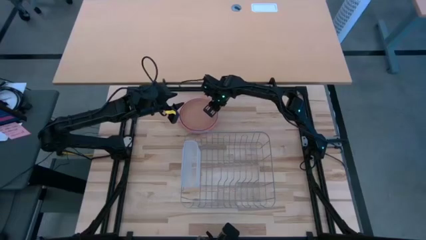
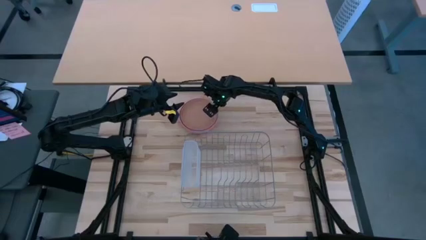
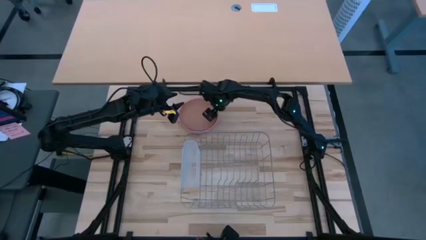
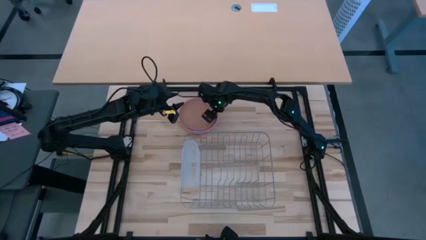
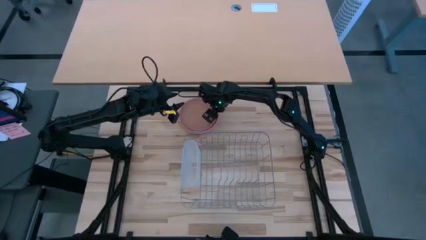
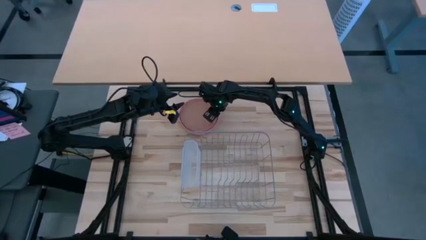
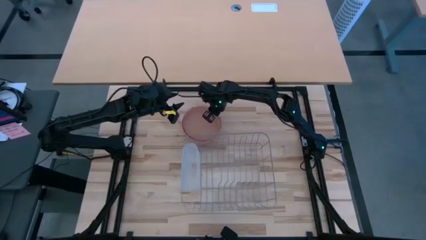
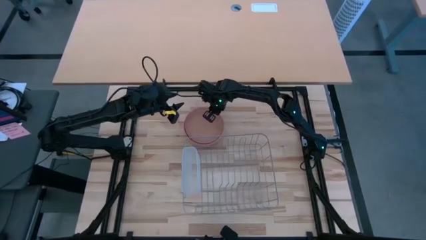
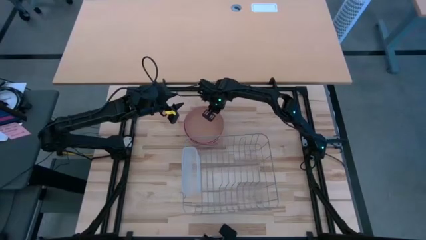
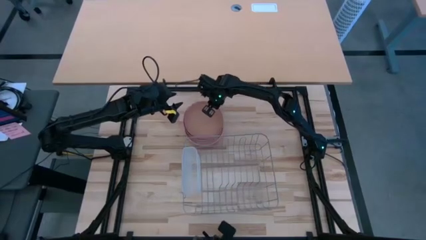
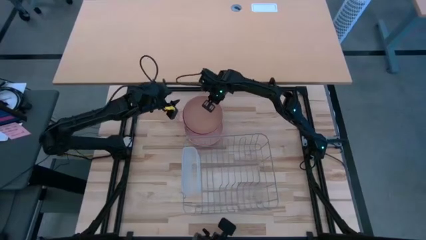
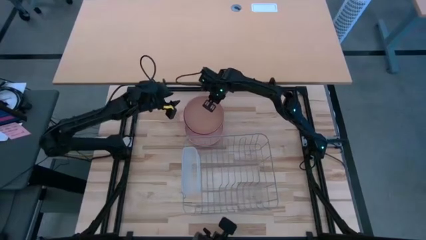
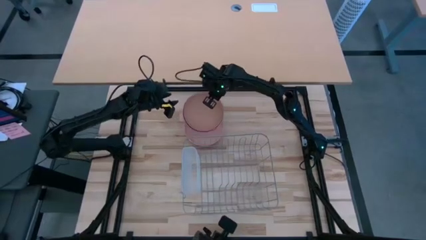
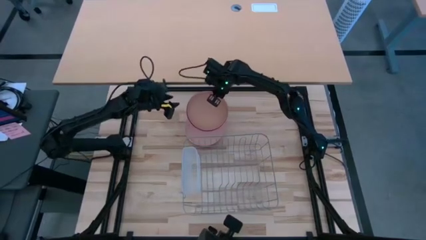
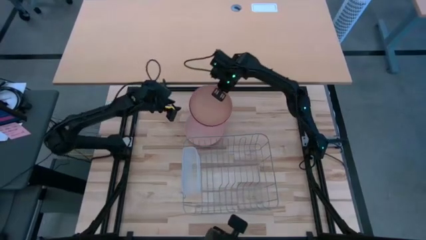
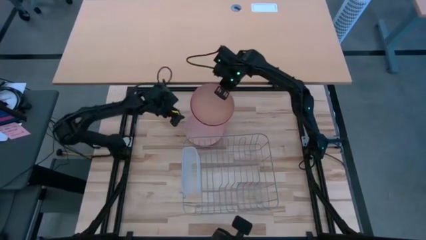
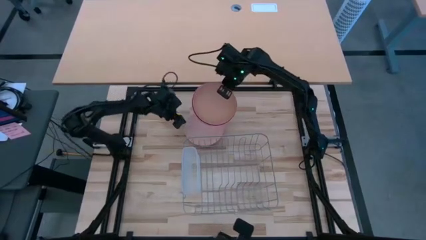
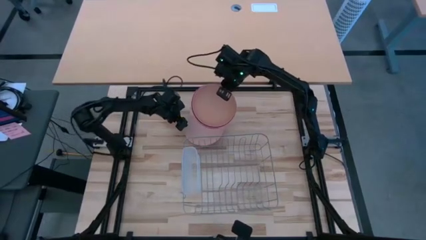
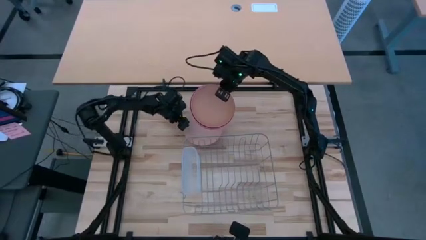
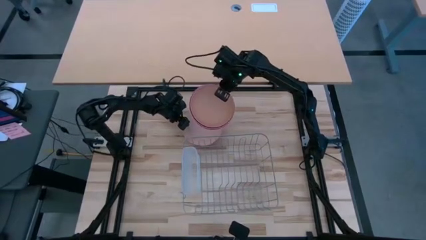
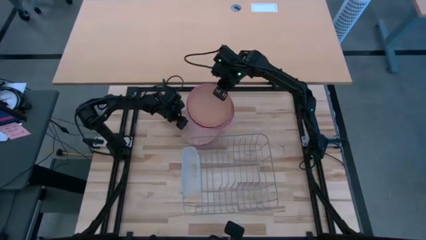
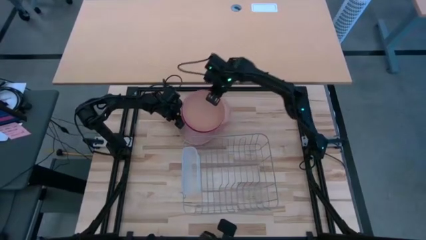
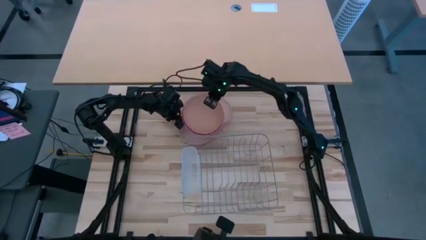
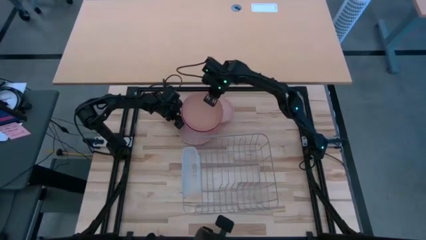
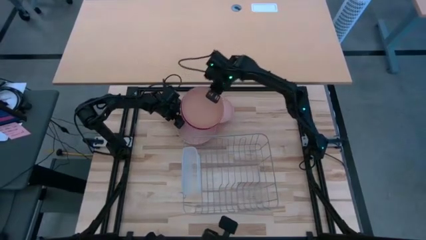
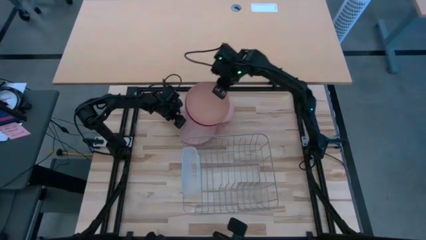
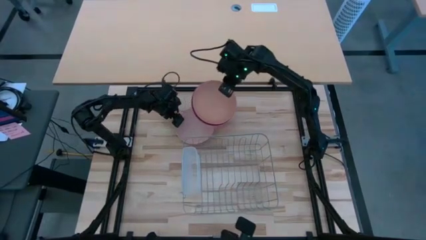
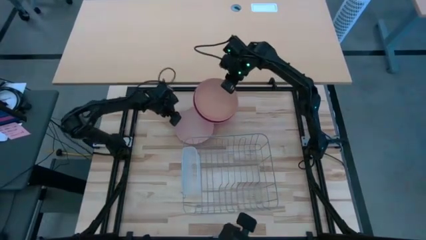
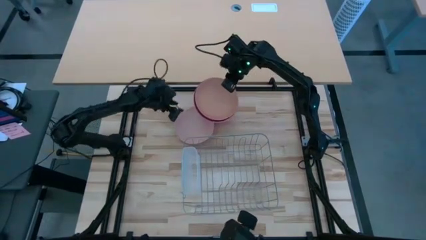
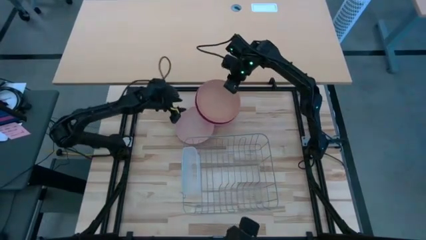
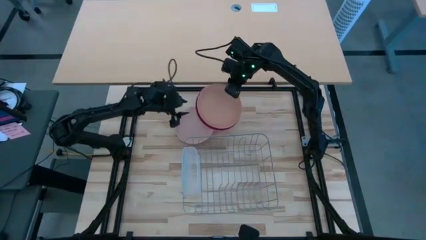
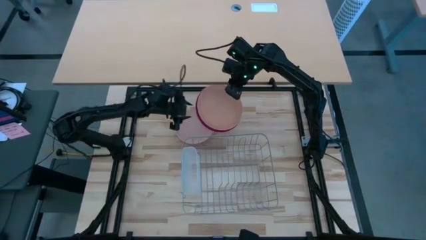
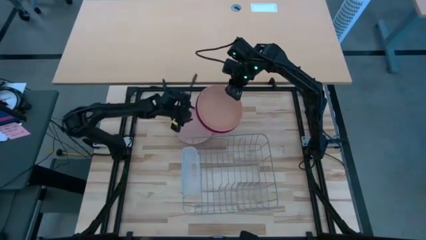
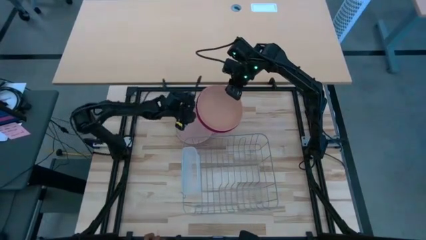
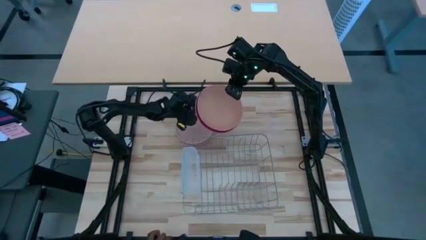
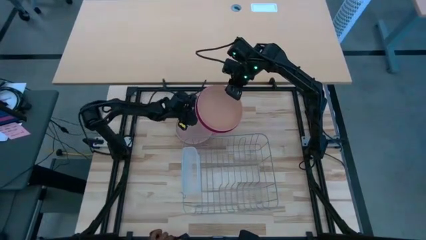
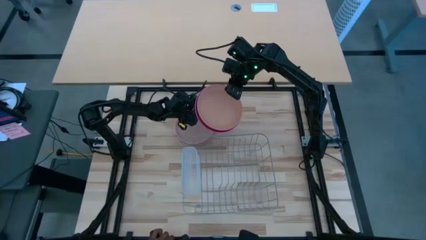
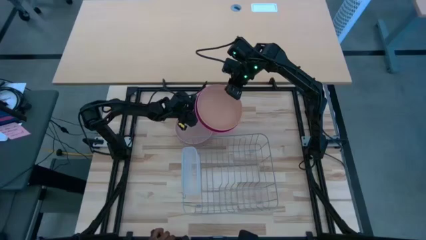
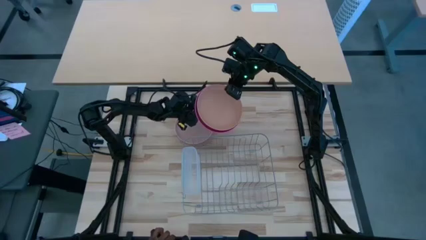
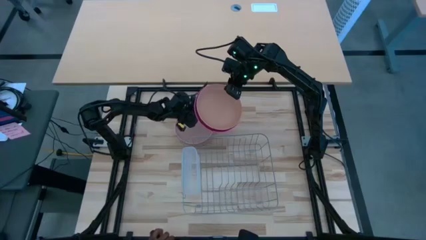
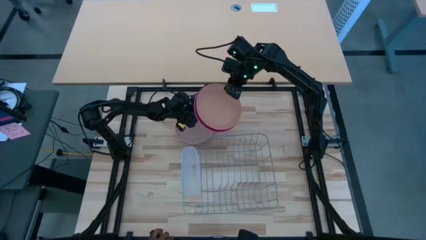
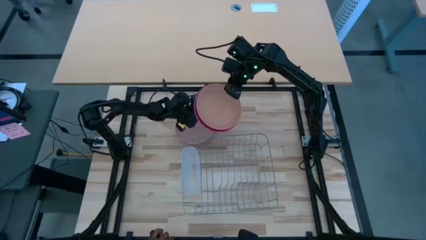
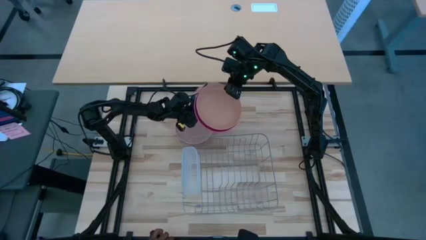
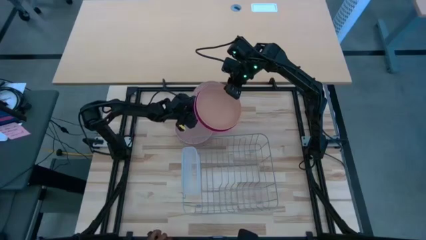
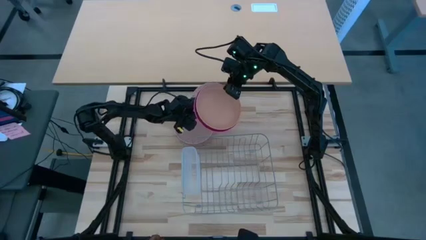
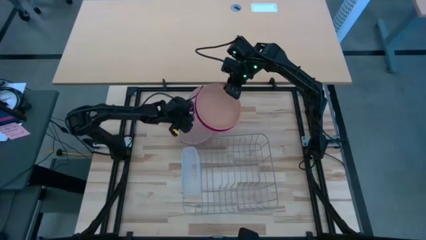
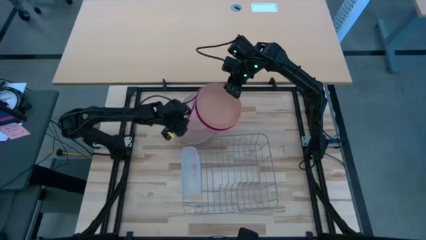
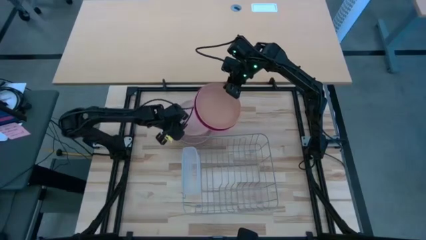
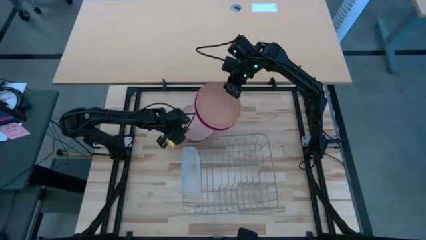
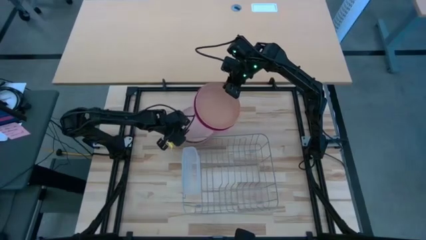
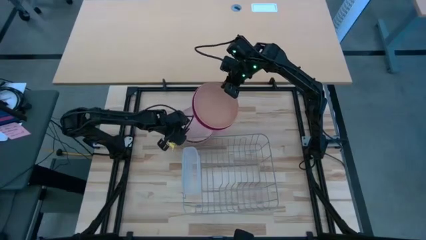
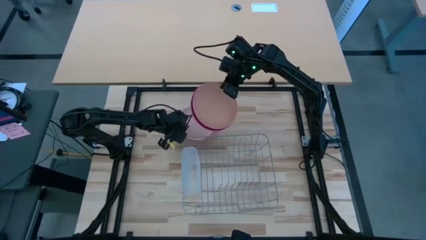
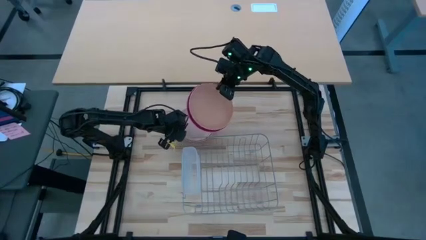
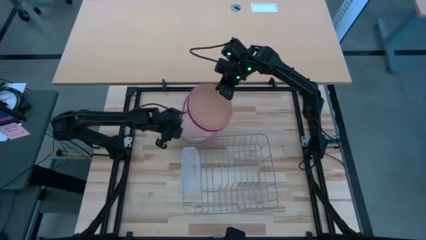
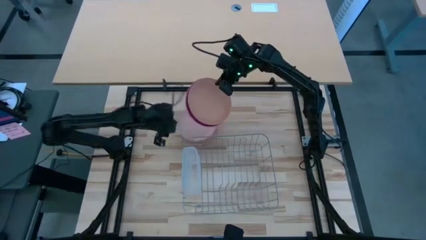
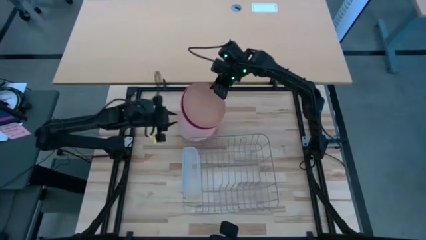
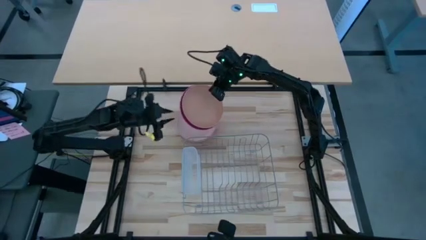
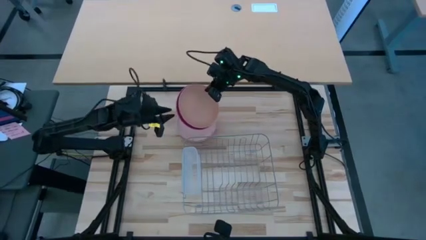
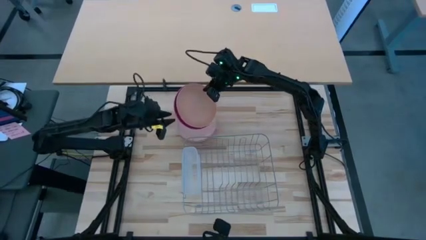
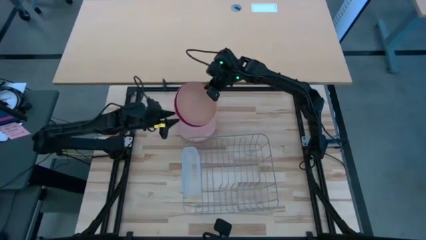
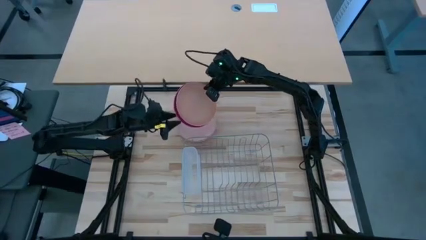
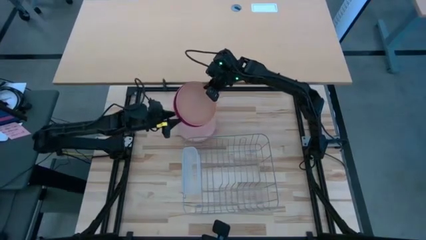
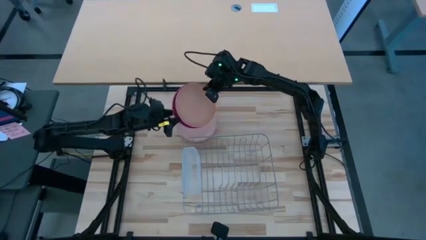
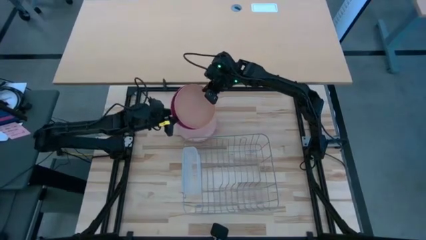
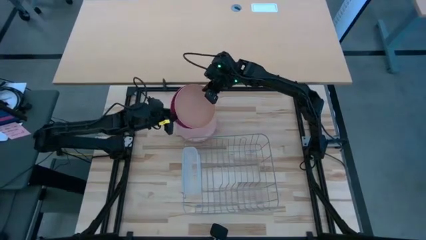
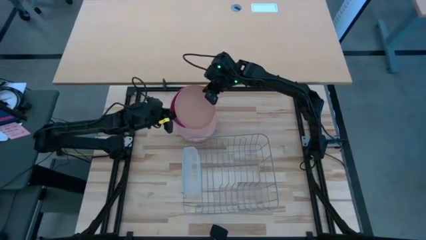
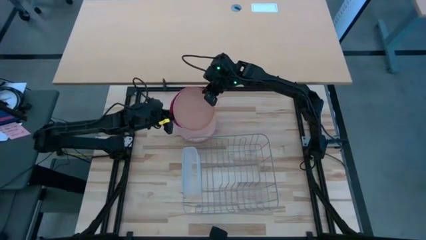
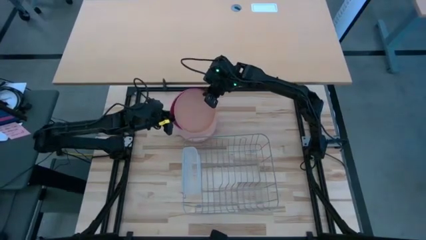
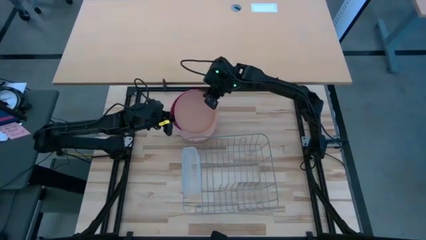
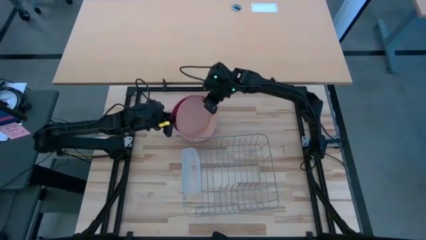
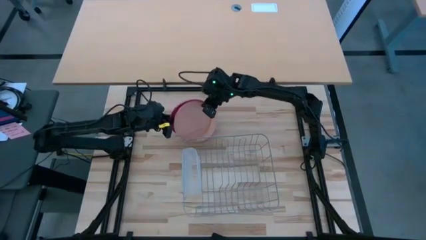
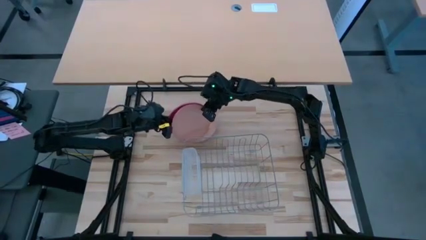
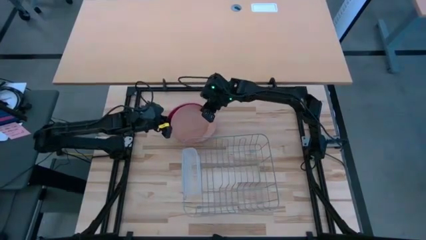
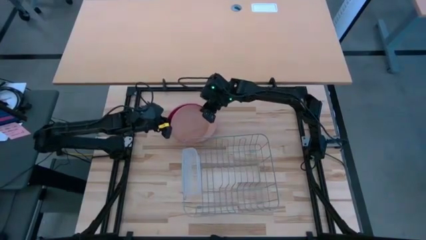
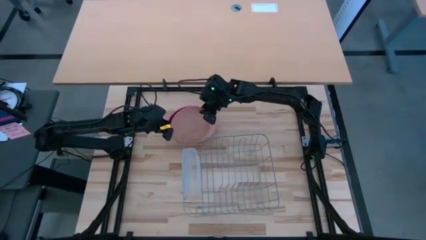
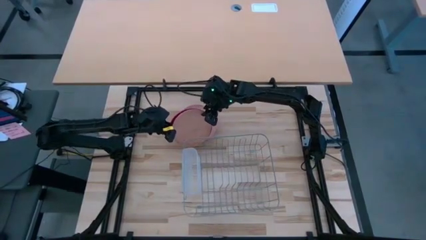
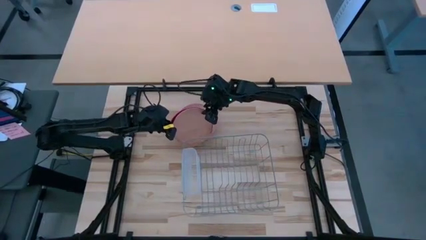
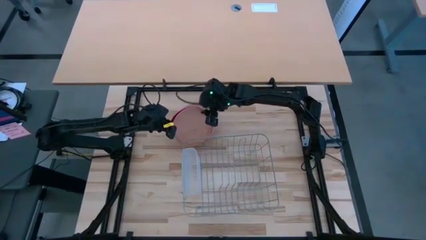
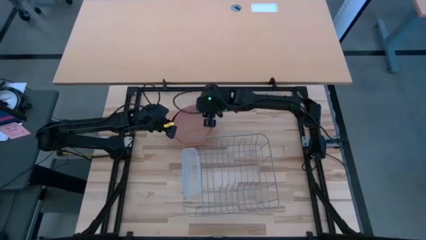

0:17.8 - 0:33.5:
Task: Sort dishes
Put the light brown plate in the dish rack

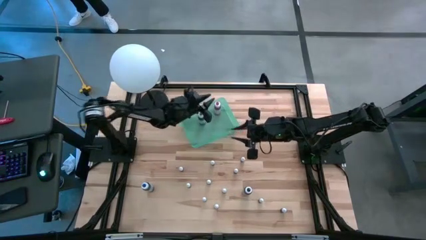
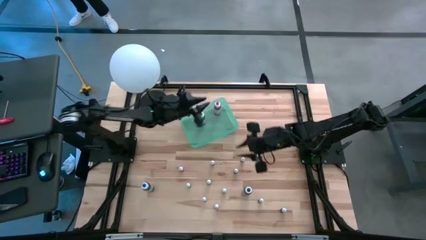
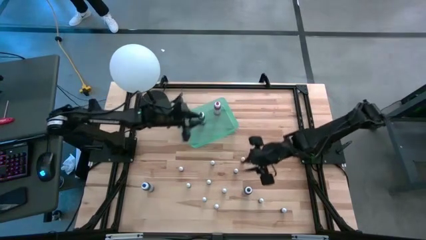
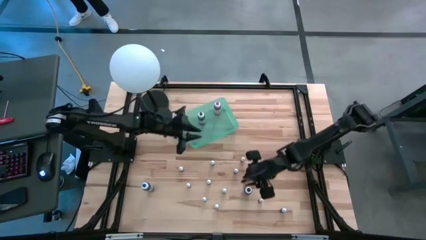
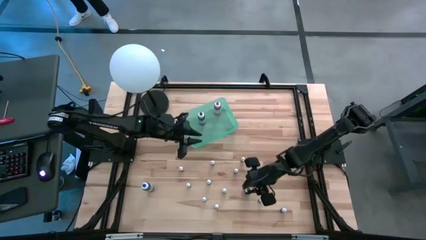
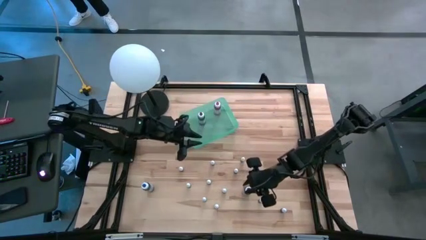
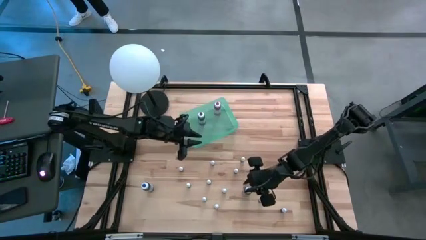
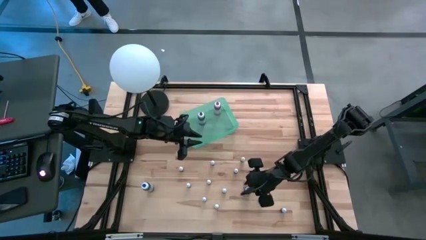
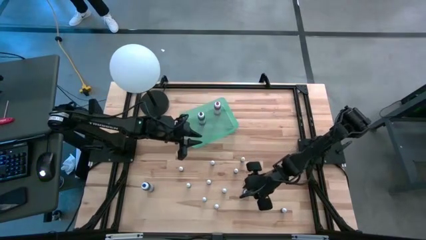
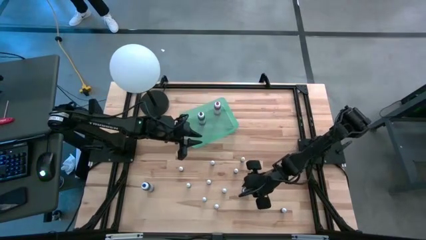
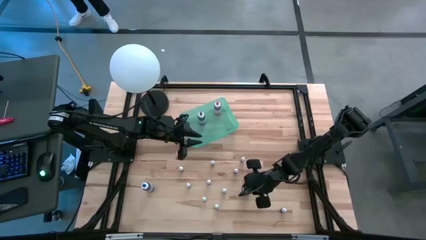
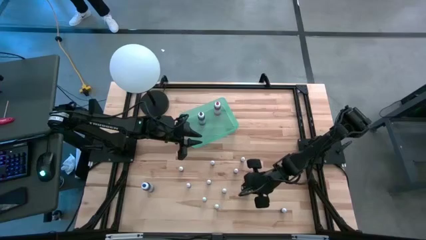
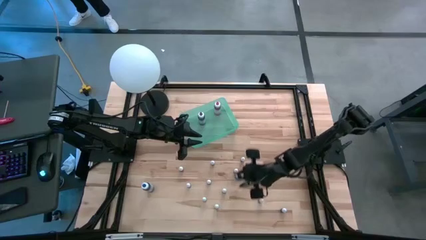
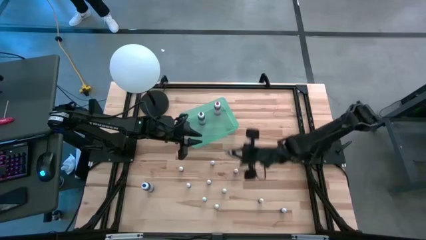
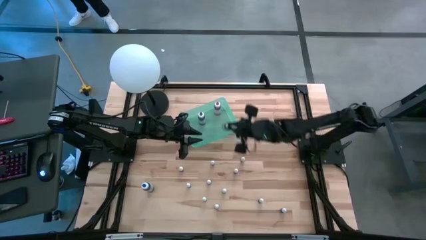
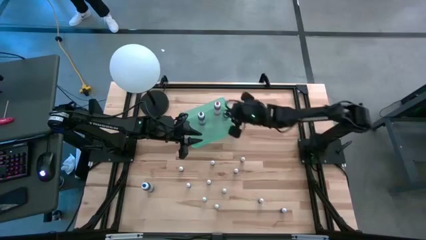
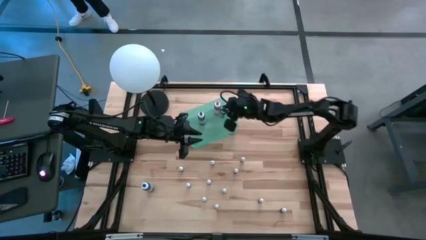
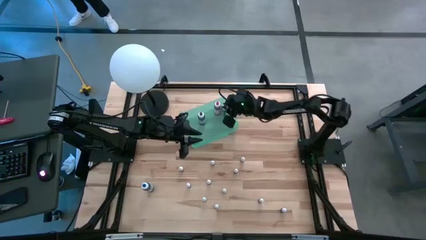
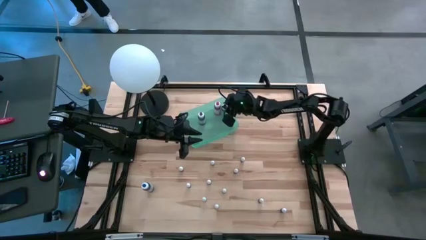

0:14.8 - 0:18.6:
Task: Pick & Place food coloring
Put the large black bottle into the blue bin
